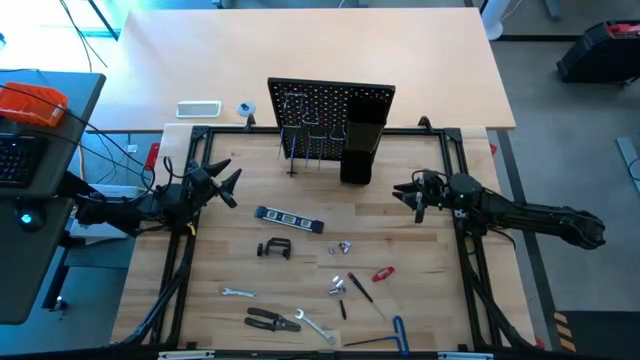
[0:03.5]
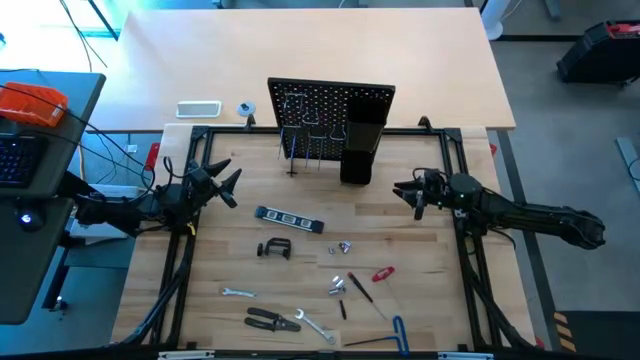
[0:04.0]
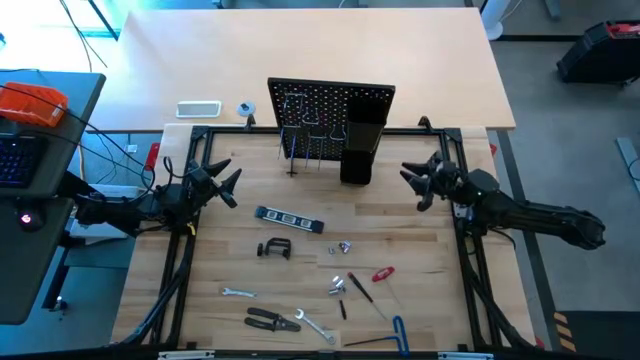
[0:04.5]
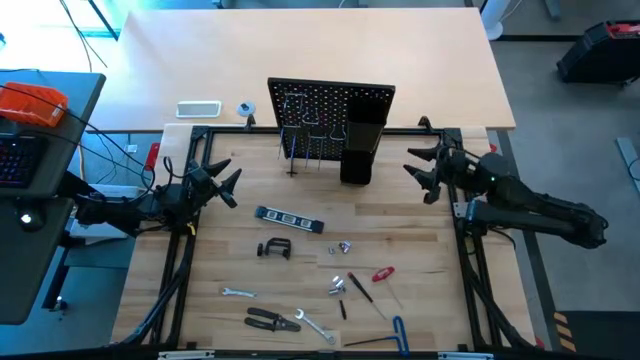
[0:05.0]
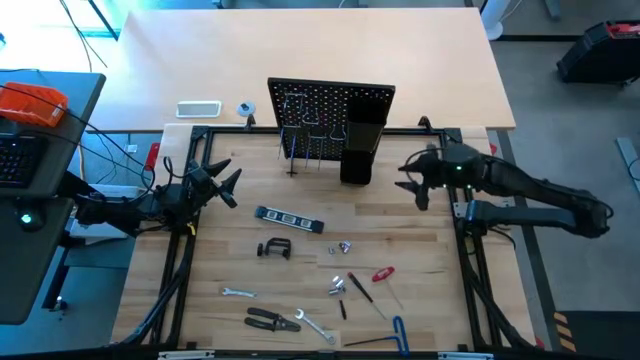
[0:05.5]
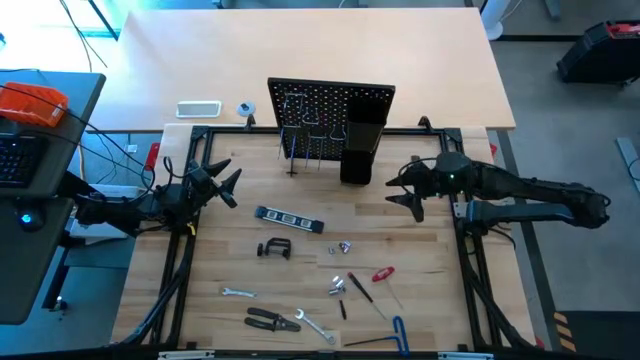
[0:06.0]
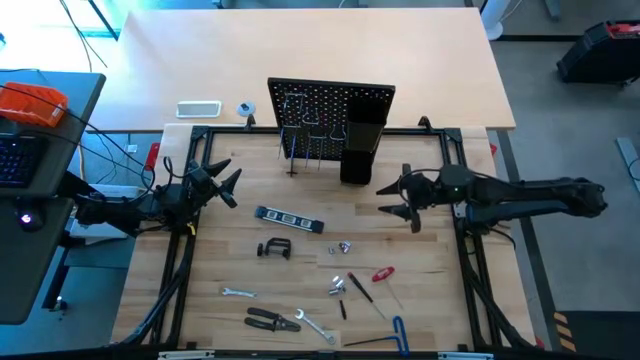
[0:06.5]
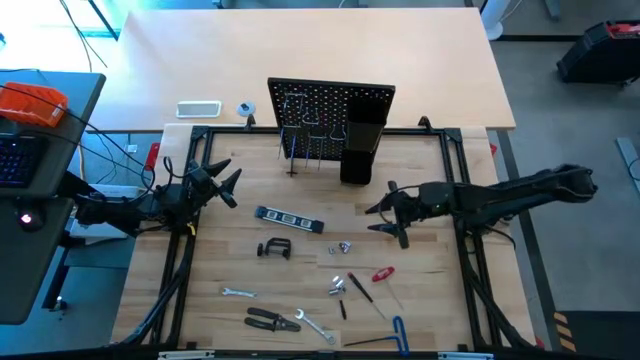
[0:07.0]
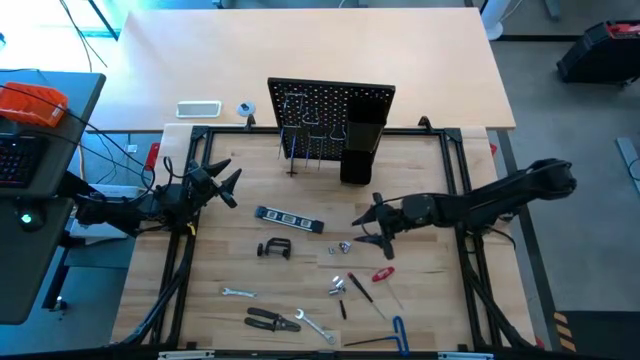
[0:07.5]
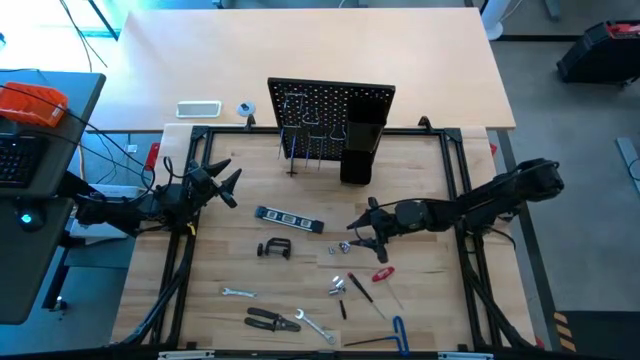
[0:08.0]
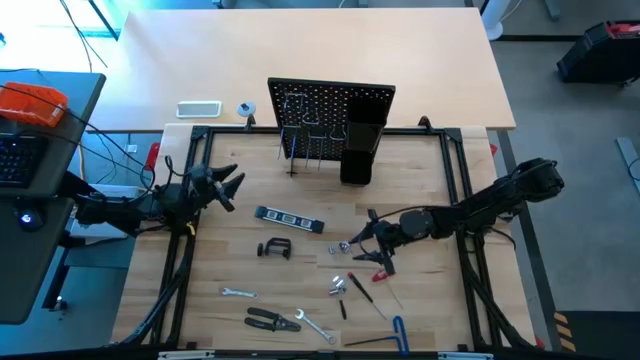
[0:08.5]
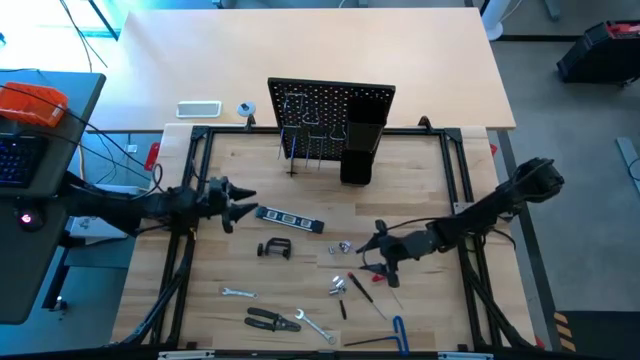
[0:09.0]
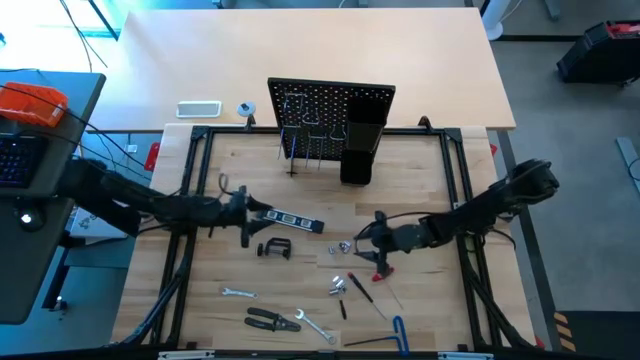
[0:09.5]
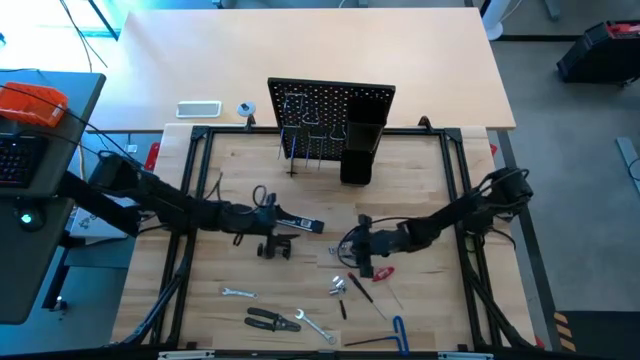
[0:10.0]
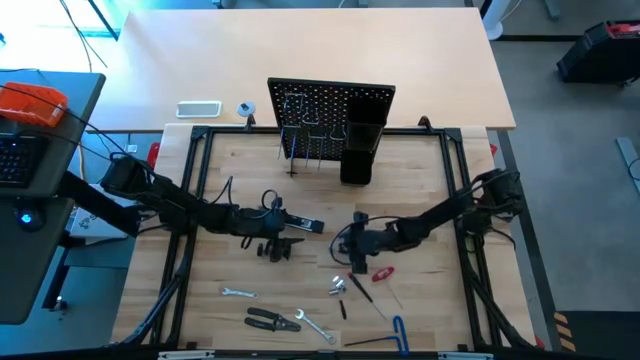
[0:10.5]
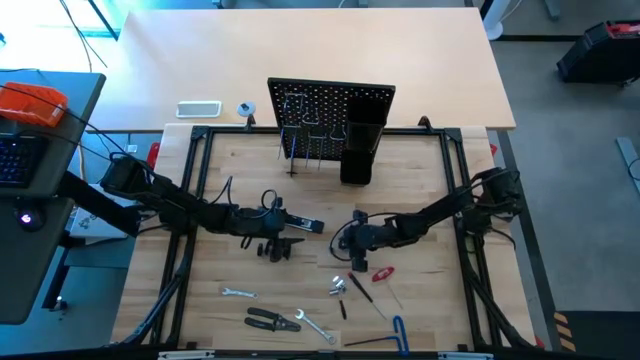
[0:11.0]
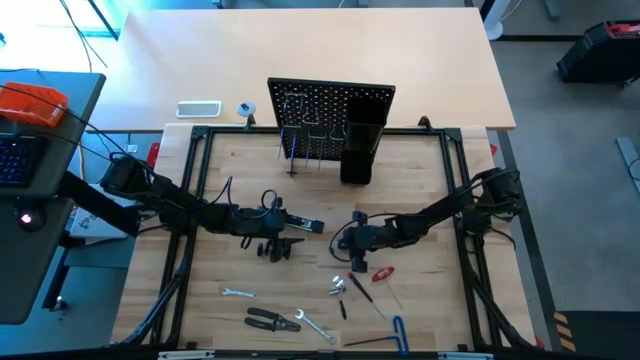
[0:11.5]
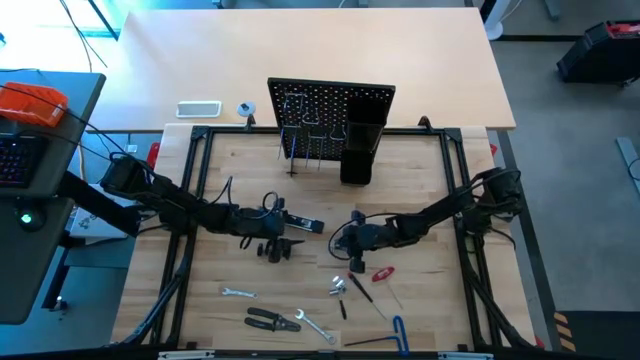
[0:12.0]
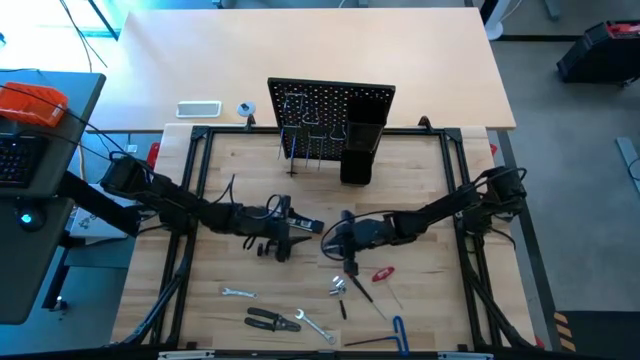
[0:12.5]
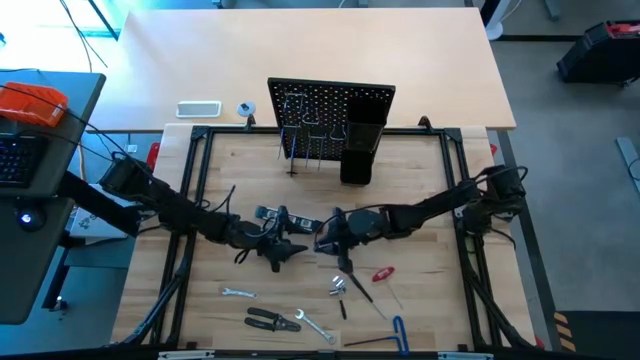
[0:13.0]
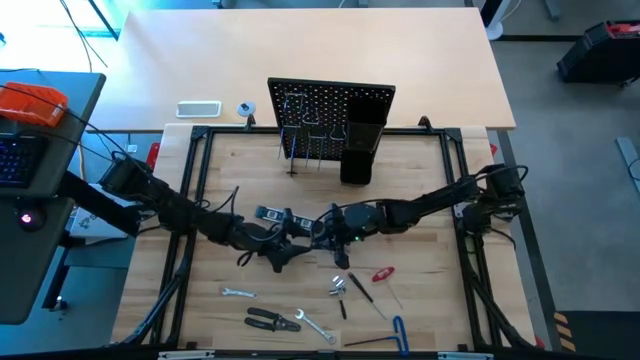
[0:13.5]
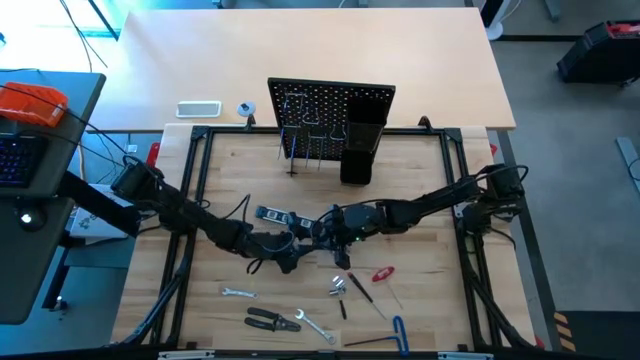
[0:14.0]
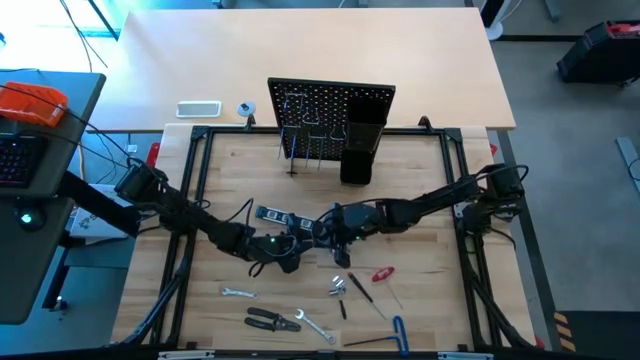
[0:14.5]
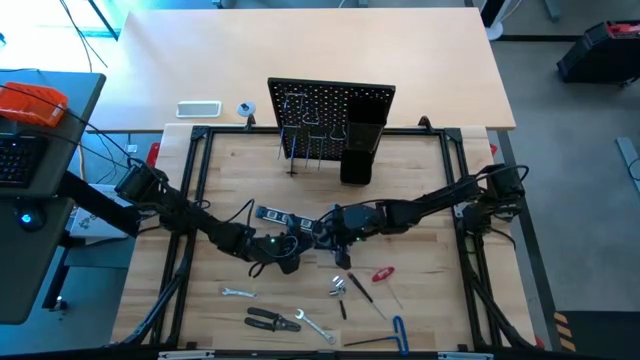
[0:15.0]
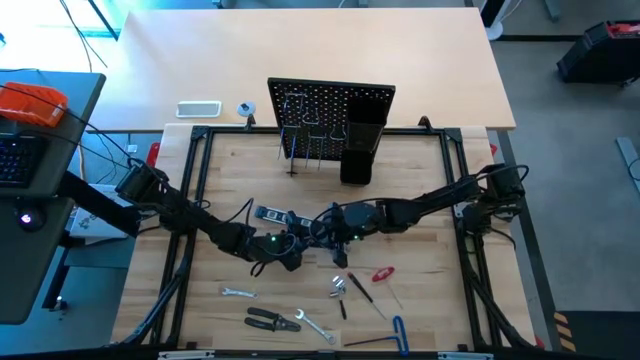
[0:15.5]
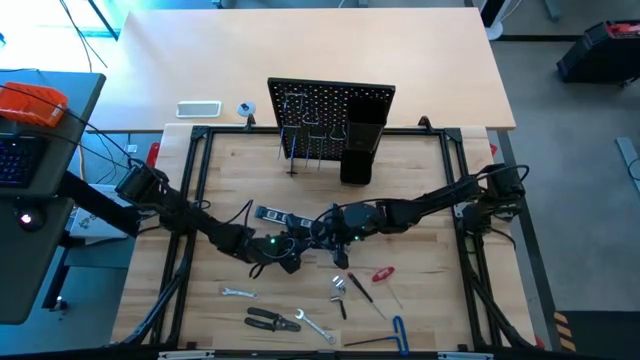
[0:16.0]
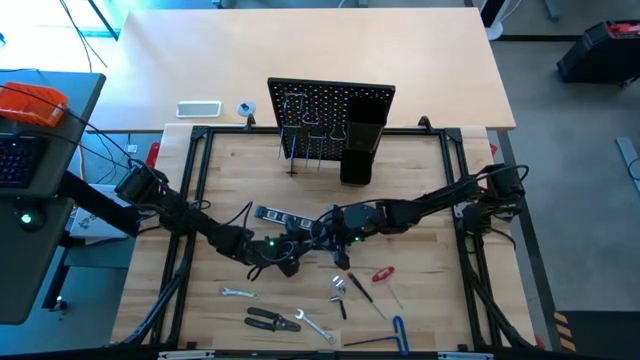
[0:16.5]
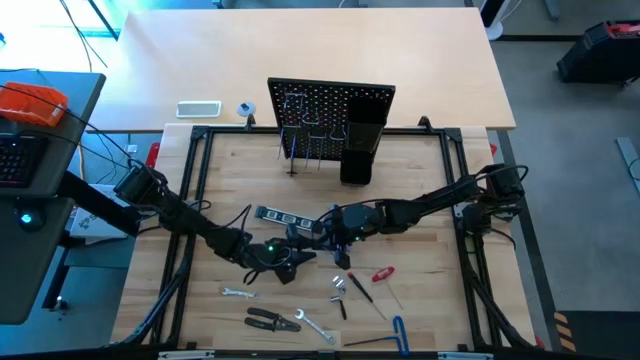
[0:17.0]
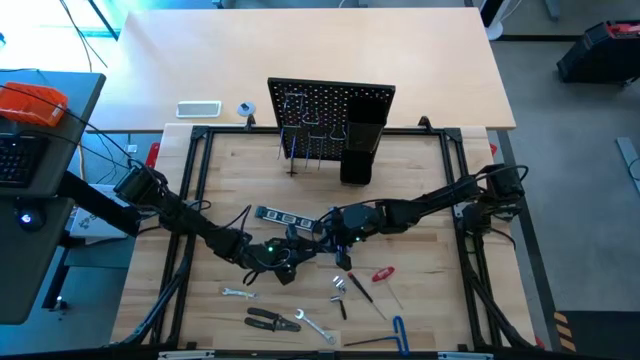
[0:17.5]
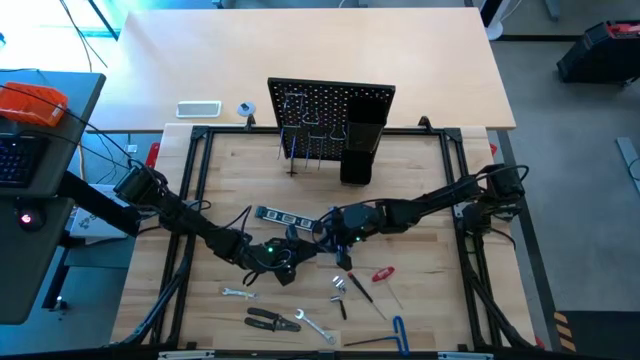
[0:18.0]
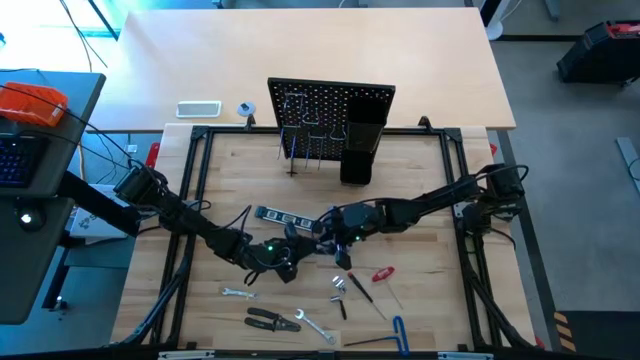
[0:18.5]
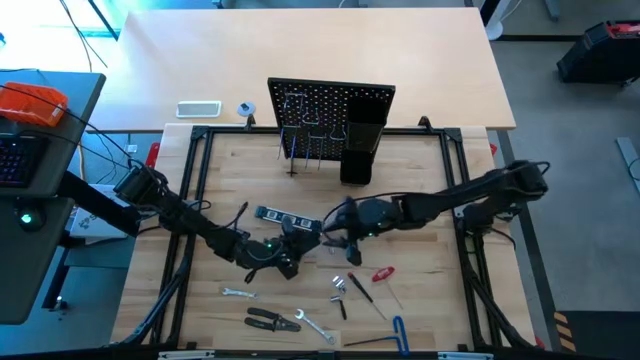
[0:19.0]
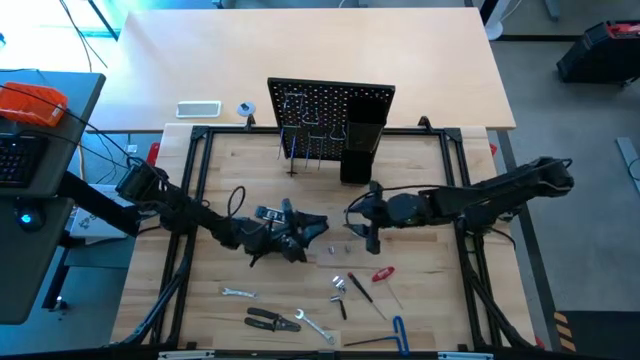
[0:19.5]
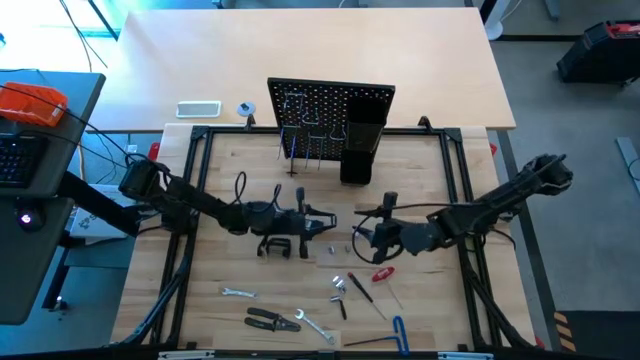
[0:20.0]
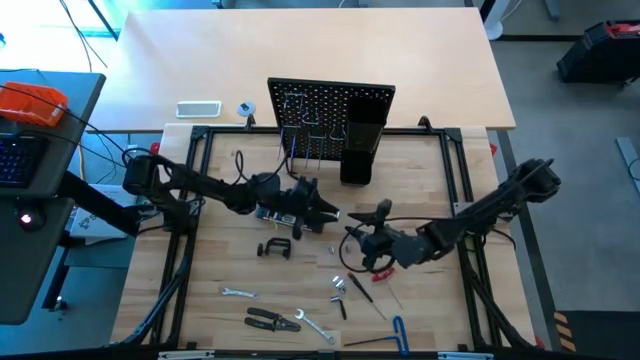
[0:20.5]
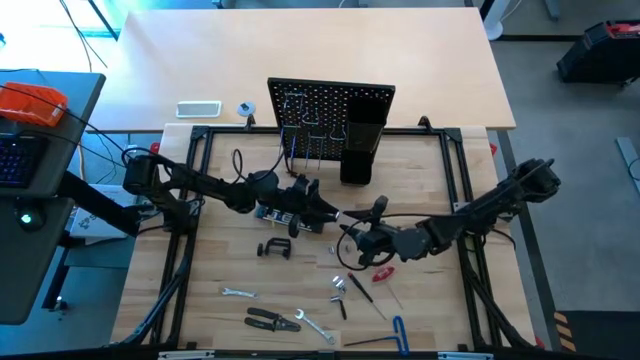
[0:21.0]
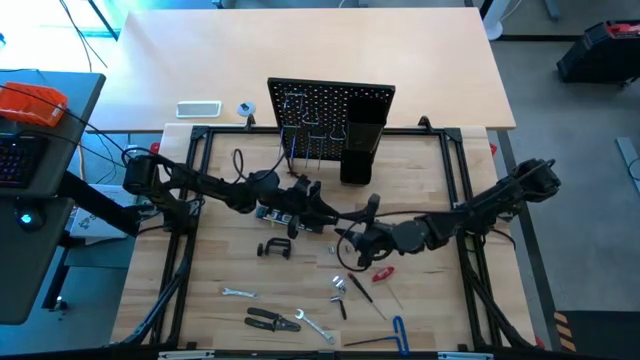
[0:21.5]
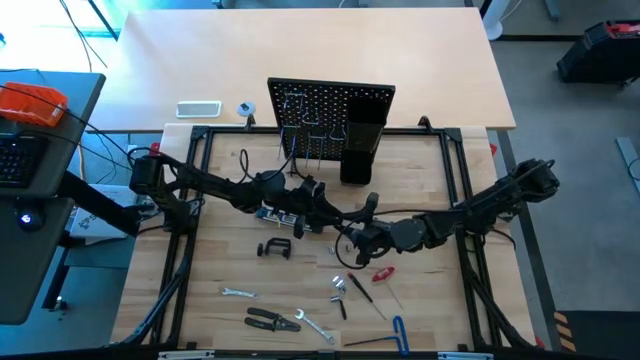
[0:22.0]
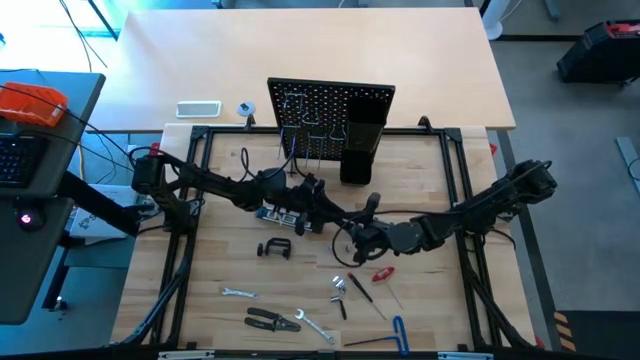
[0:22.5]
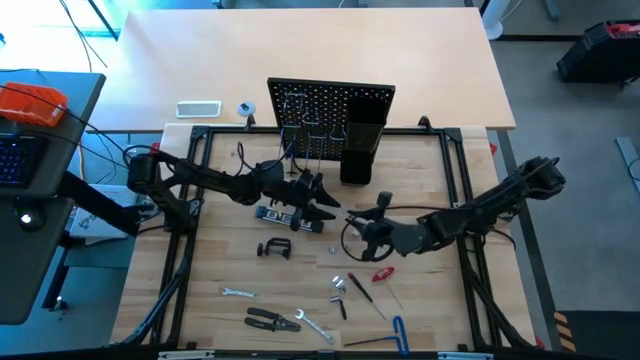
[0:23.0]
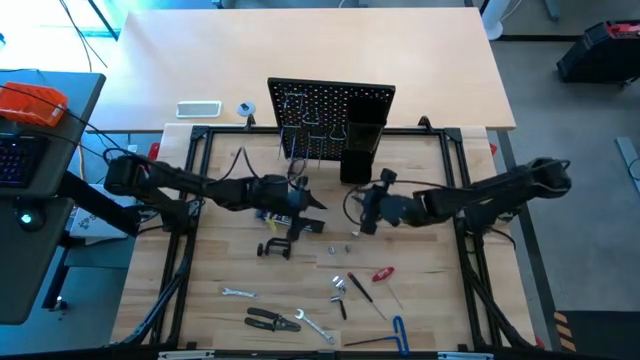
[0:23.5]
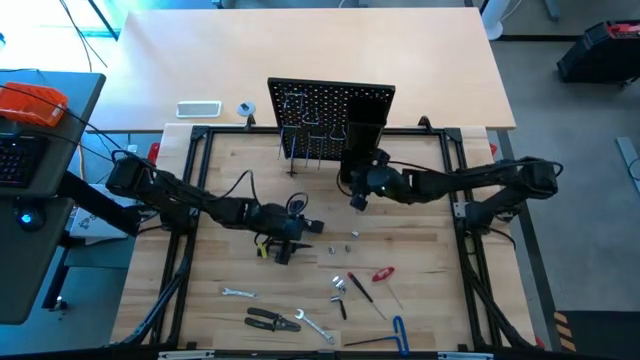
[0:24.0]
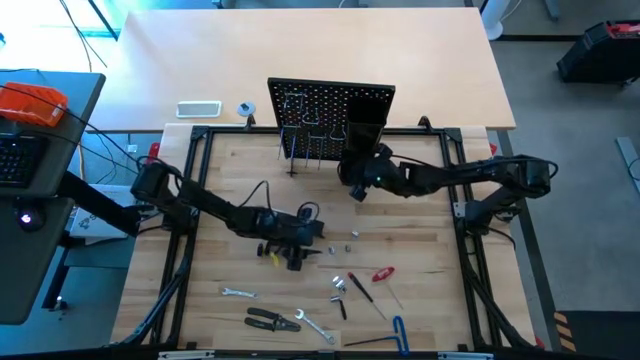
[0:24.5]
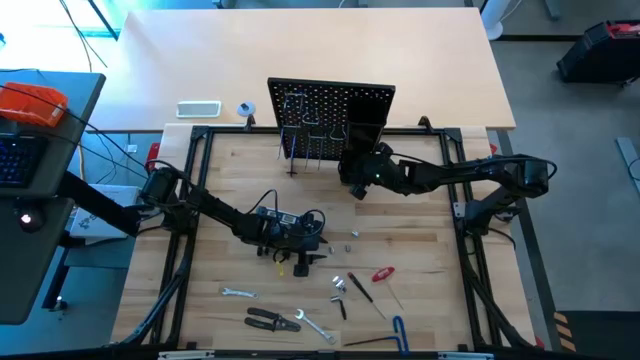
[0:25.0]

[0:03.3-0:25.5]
Task: Hang tools onto peg board
Put the top center socket into the bottom peg board bin
